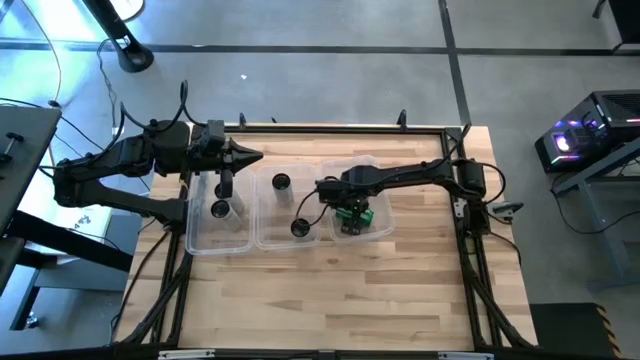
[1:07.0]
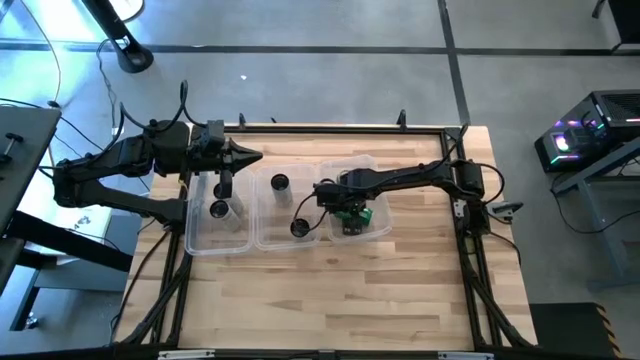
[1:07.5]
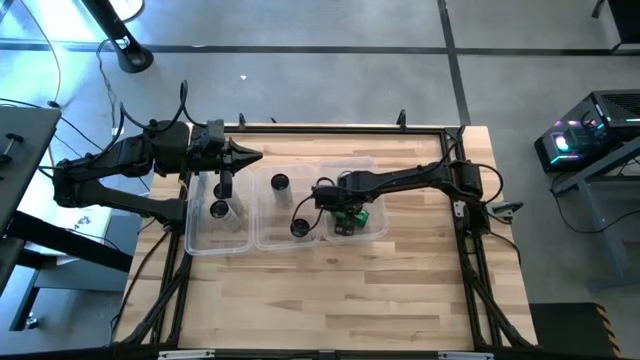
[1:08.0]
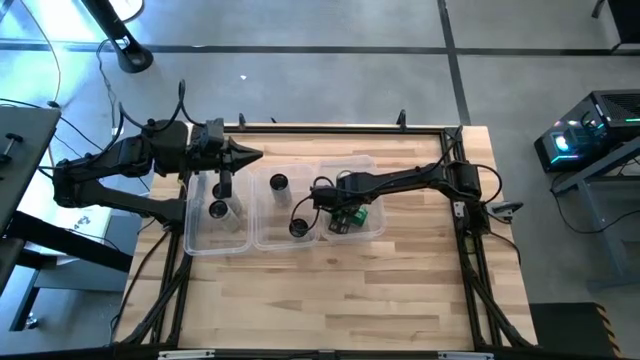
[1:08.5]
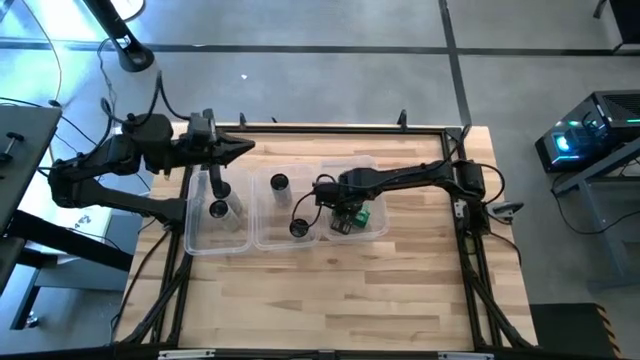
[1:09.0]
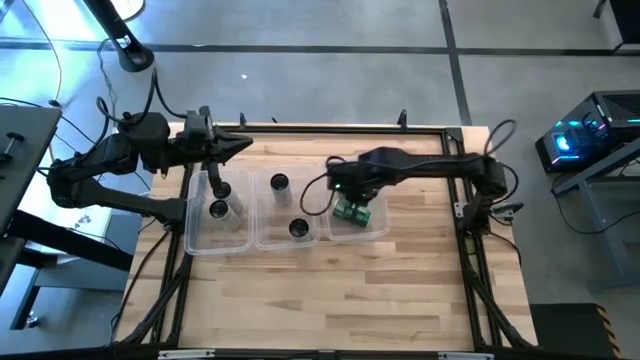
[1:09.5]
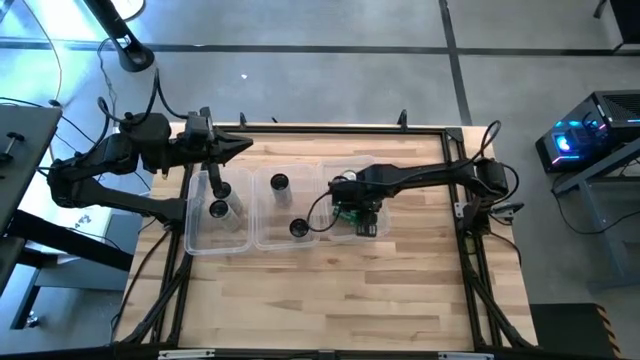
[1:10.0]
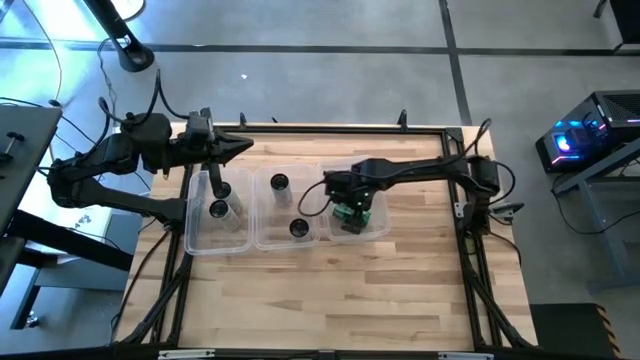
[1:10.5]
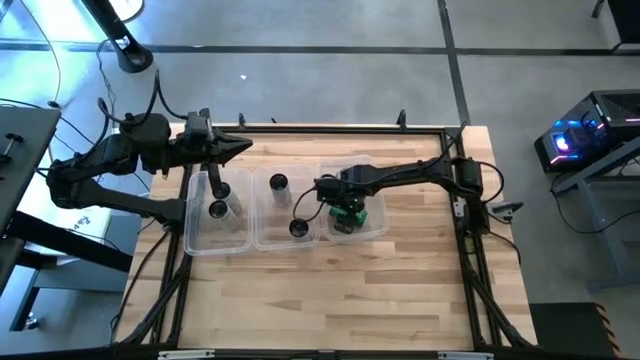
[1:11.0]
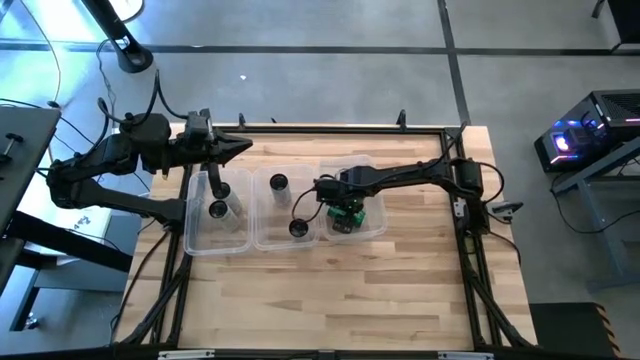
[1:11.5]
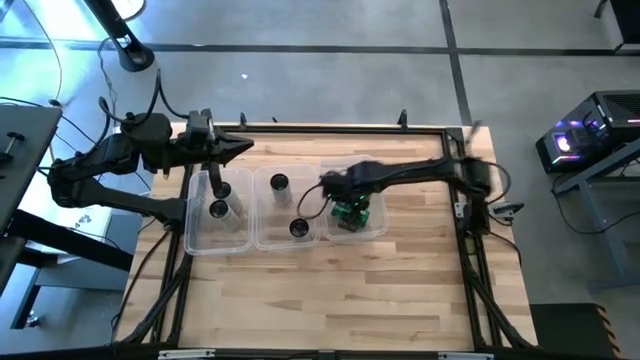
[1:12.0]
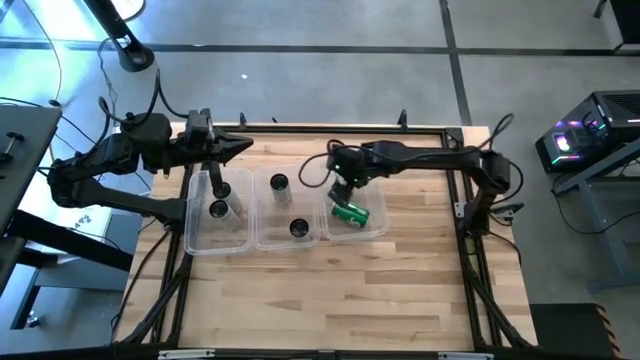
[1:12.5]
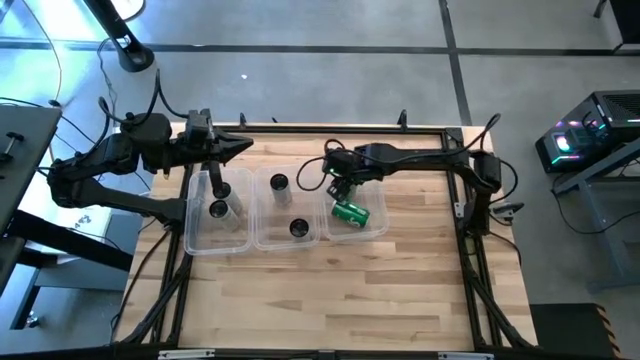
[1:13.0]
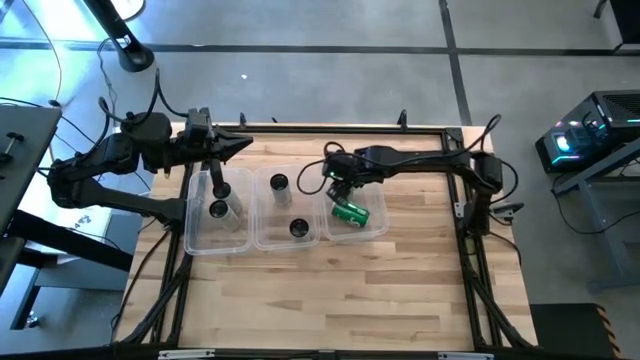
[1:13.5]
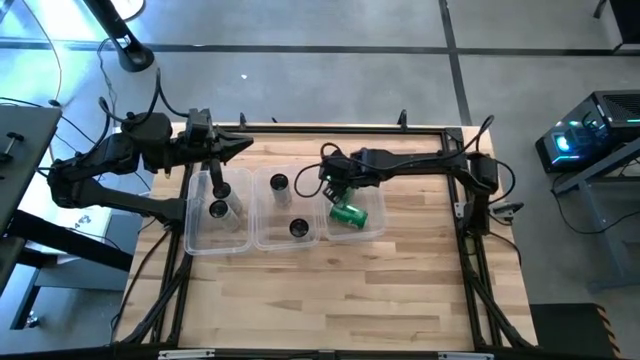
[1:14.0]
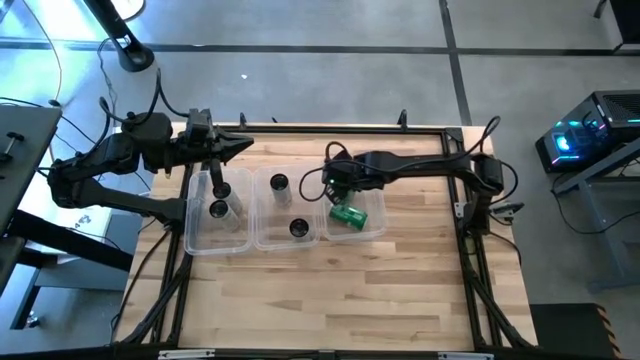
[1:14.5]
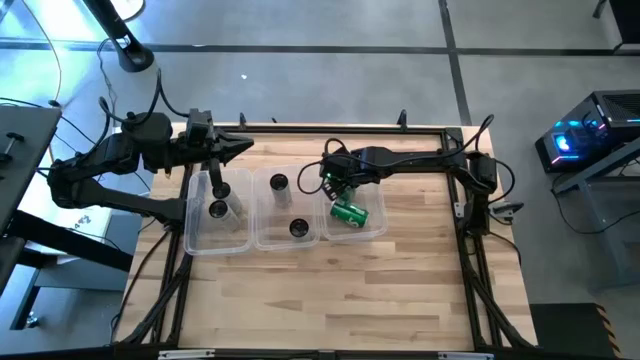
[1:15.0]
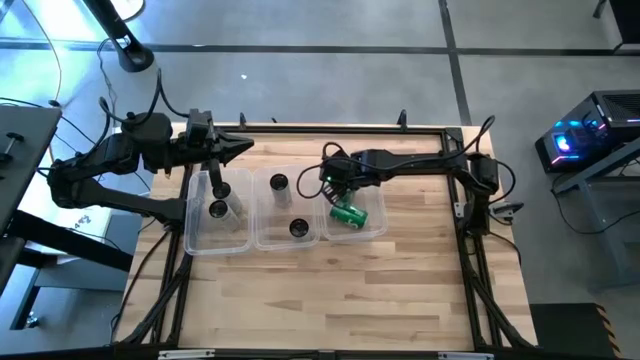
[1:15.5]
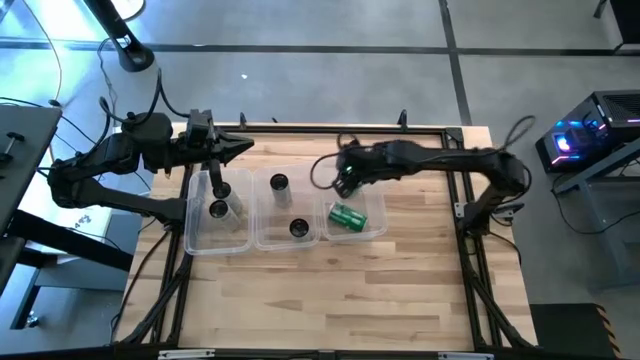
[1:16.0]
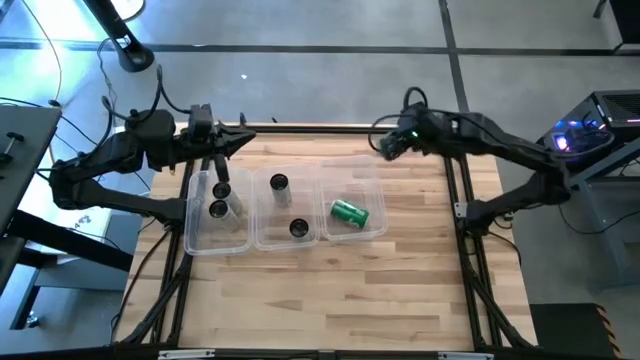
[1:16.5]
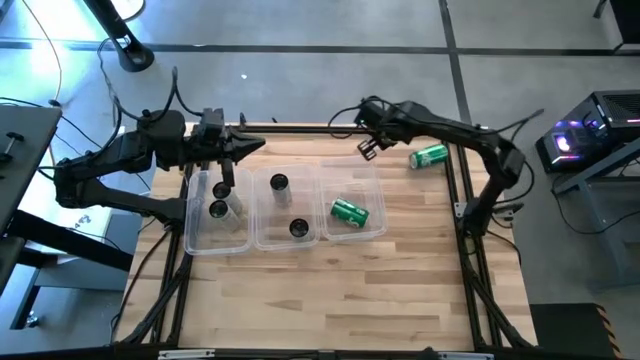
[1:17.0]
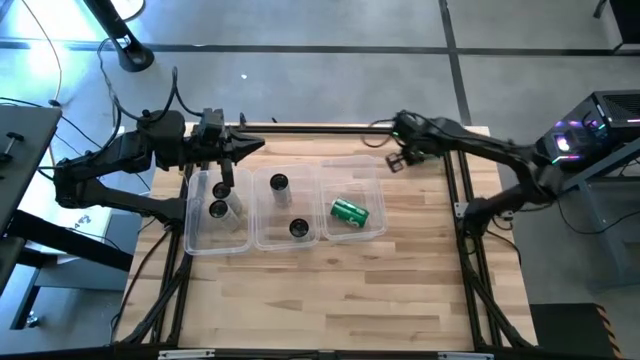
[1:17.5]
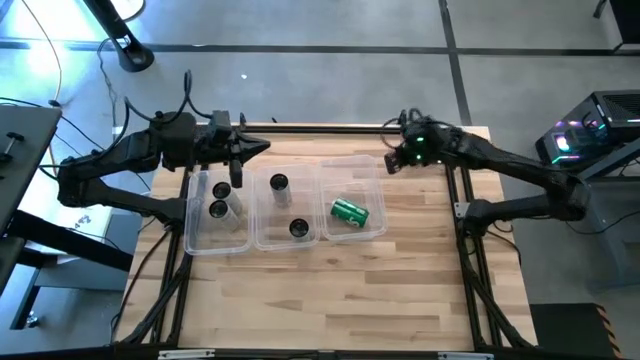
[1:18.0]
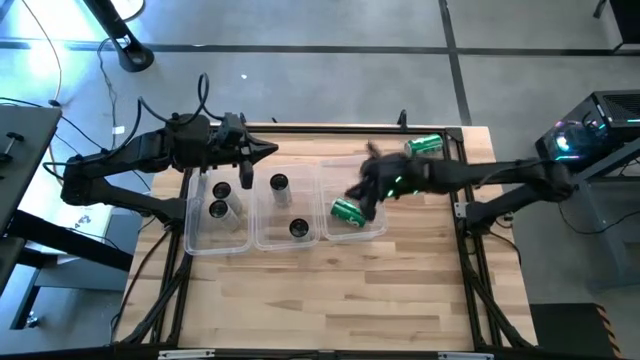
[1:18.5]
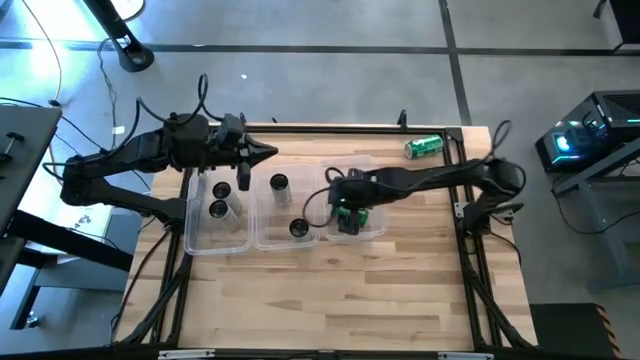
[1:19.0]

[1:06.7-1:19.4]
Task: Sort soda cans
Put the green soda can into the right transparent container

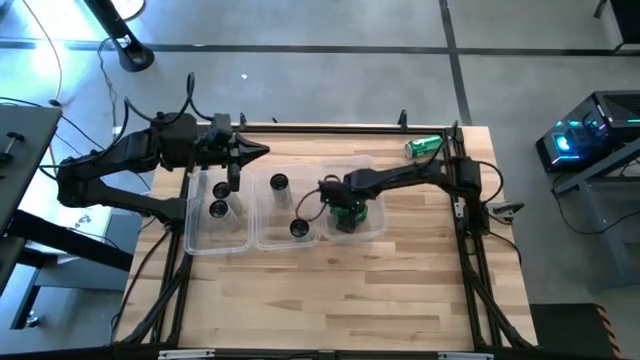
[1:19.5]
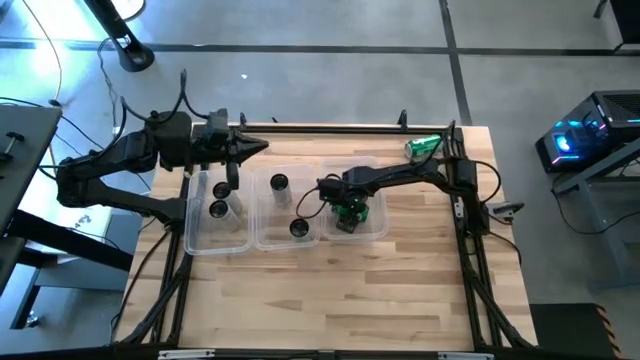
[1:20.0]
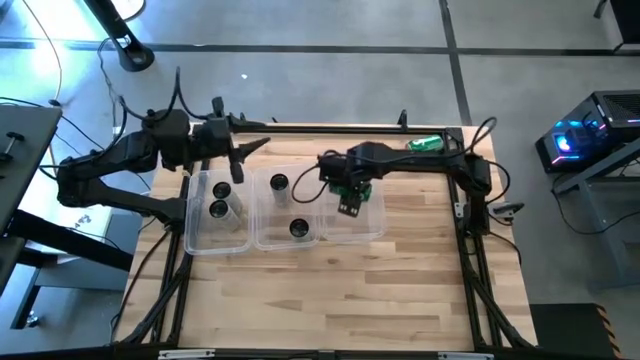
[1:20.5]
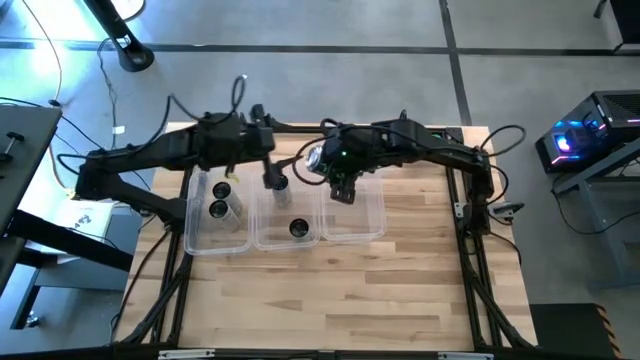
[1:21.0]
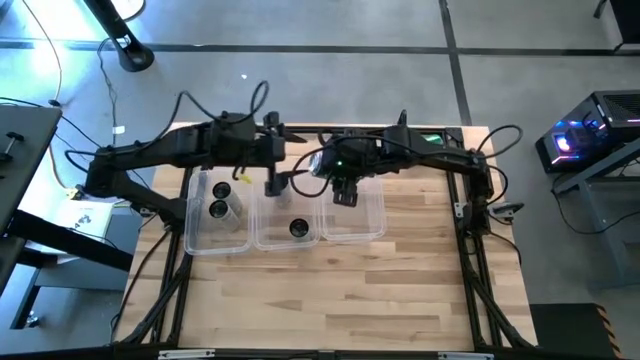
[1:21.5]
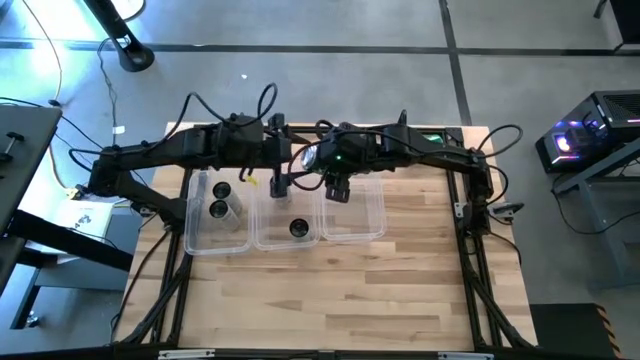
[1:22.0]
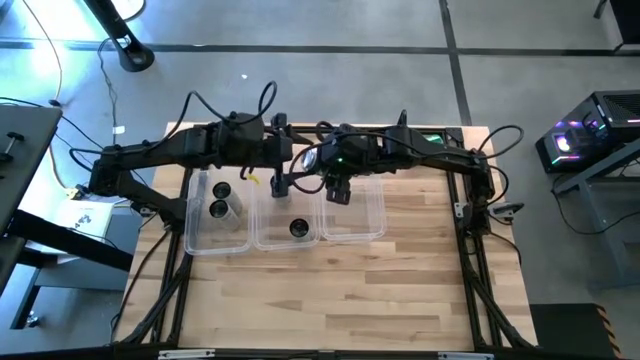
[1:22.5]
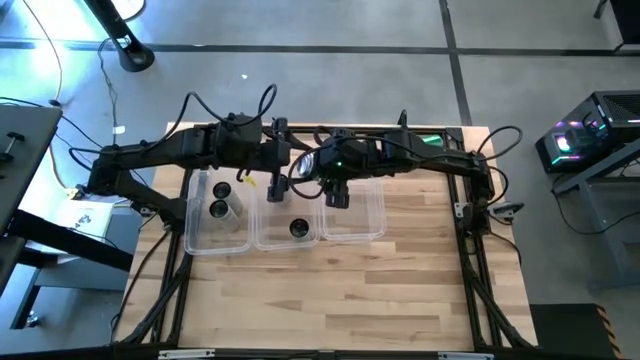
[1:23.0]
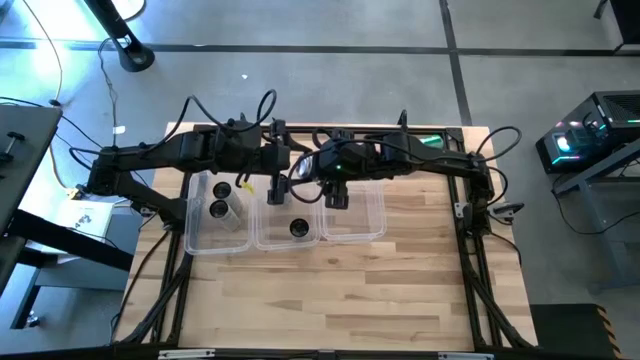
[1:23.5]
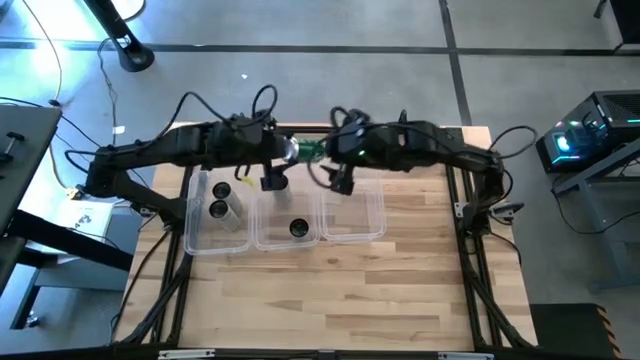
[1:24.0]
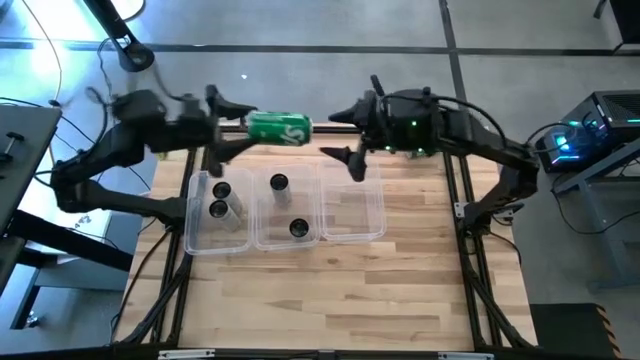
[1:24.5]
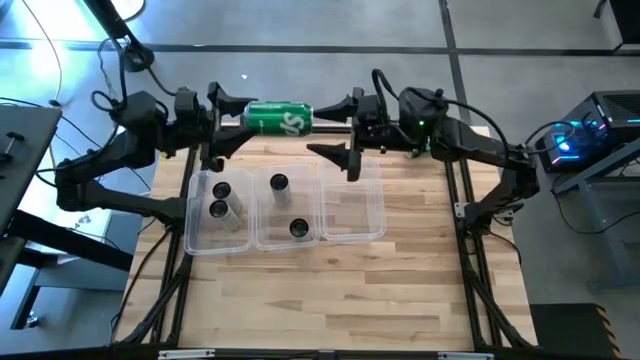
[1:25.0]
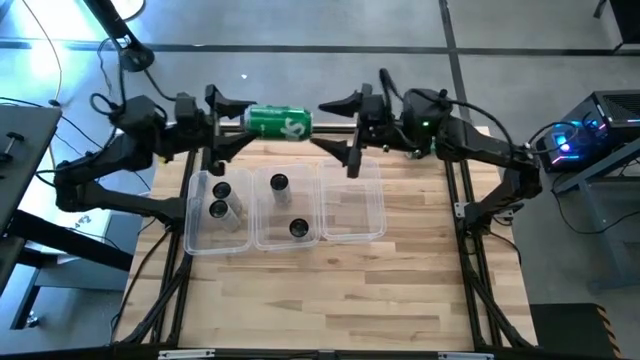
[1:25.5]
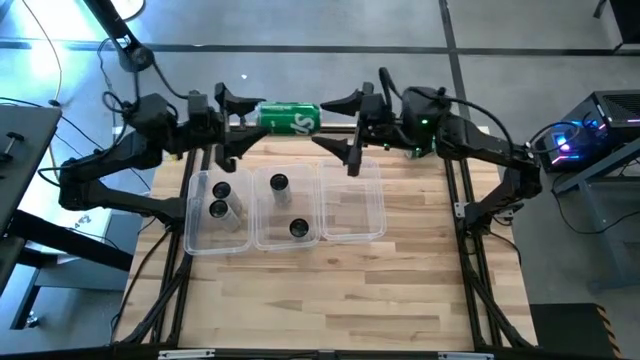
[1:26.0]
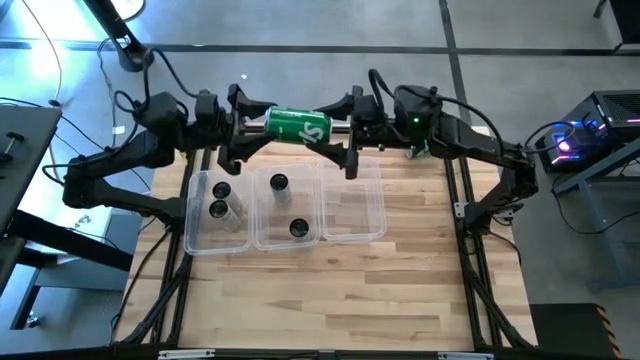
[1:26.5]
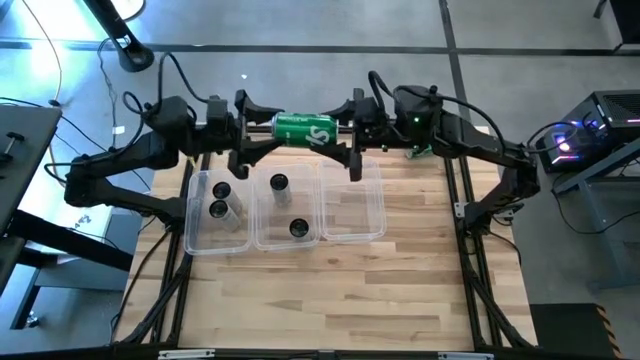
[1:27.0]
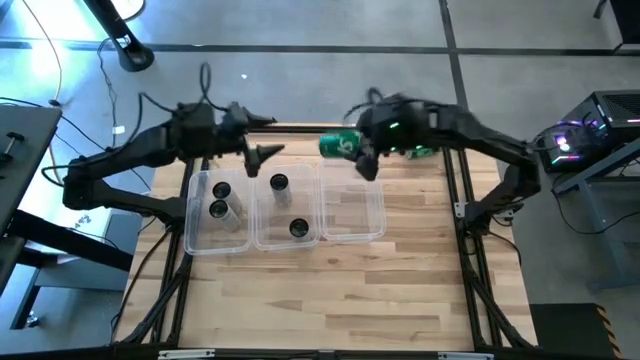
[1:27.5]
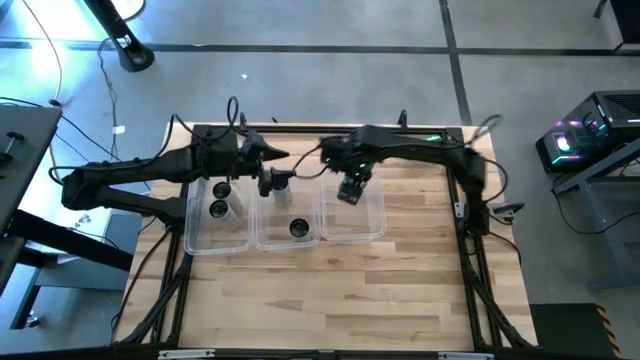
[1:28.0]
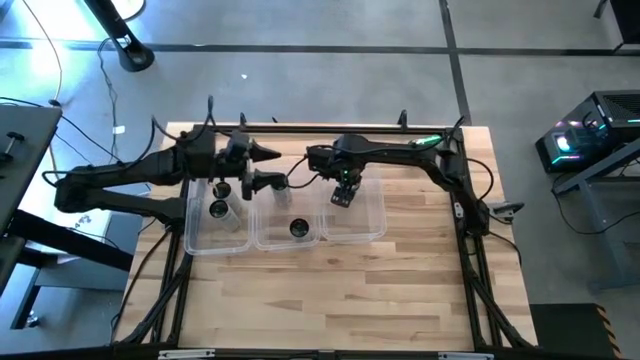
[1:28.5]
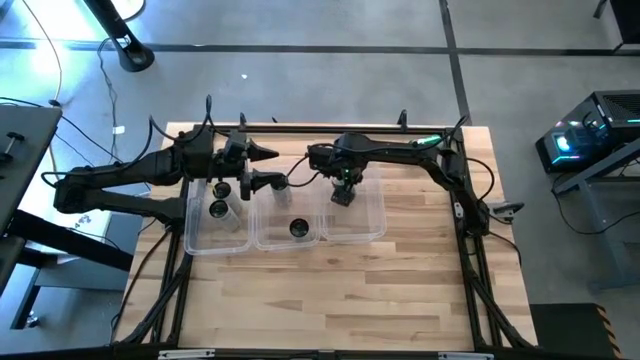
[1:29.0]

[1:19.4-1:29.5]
Put the green soda can into the right transparent container
